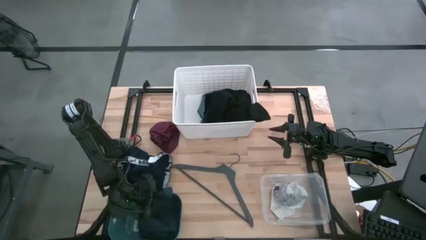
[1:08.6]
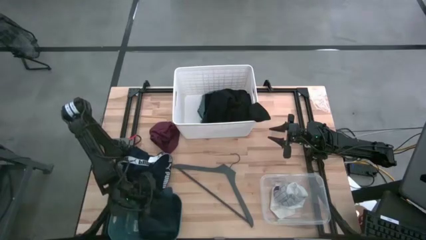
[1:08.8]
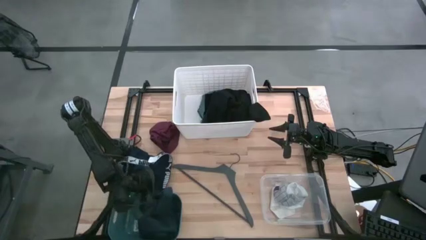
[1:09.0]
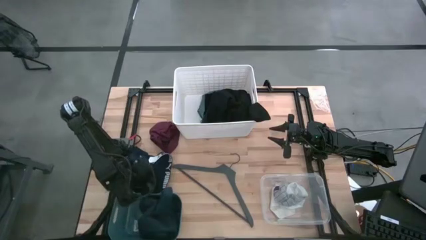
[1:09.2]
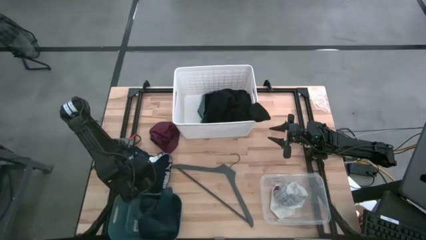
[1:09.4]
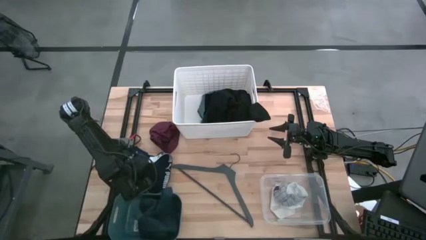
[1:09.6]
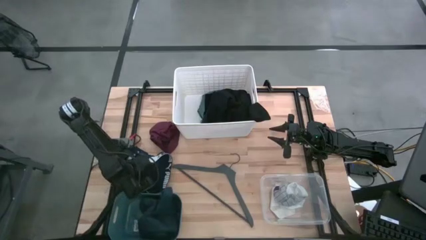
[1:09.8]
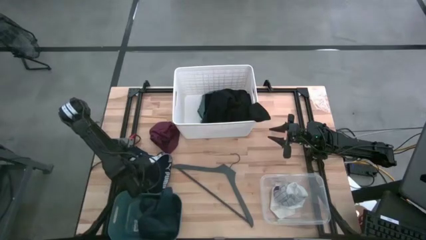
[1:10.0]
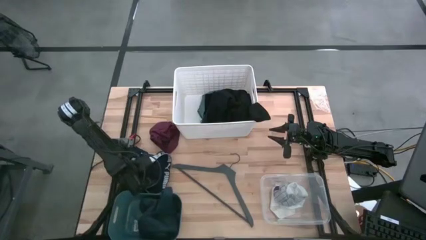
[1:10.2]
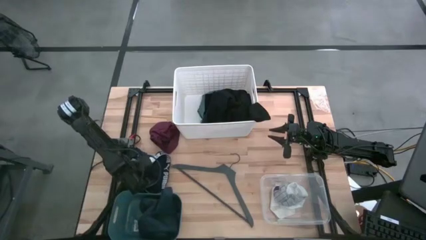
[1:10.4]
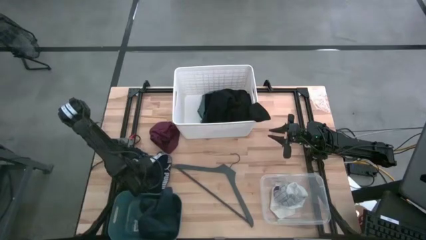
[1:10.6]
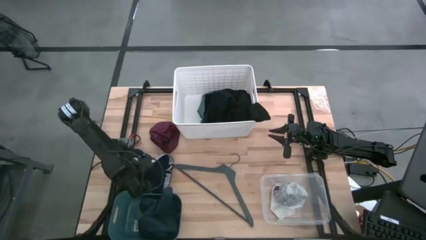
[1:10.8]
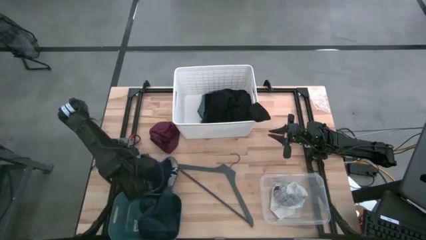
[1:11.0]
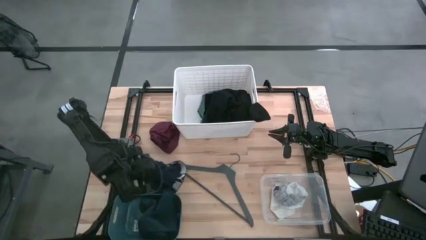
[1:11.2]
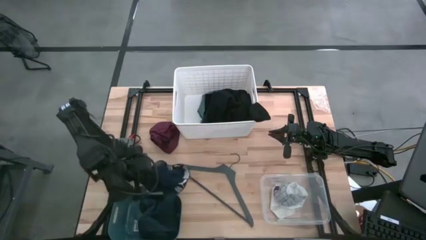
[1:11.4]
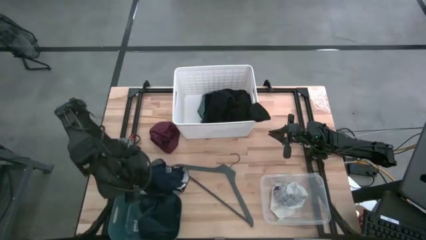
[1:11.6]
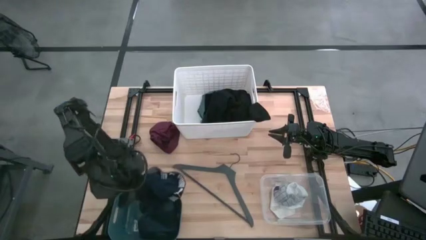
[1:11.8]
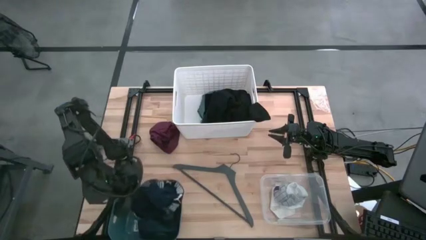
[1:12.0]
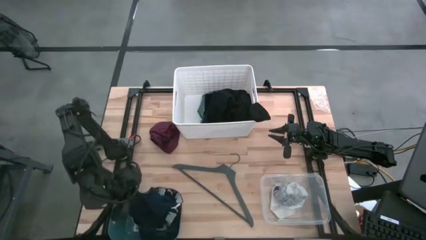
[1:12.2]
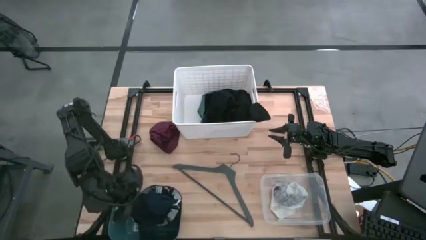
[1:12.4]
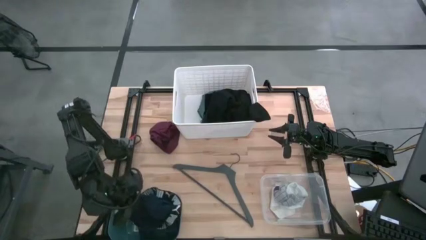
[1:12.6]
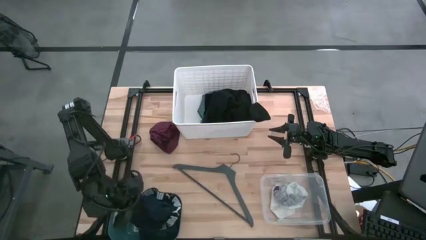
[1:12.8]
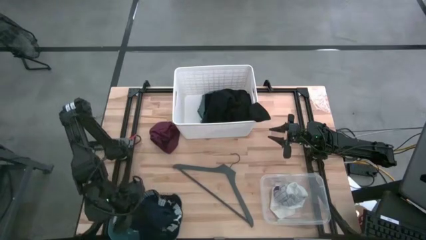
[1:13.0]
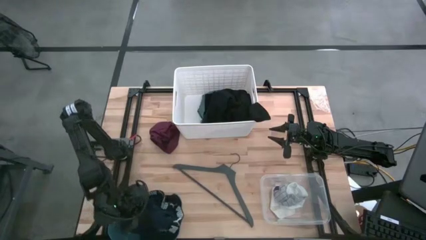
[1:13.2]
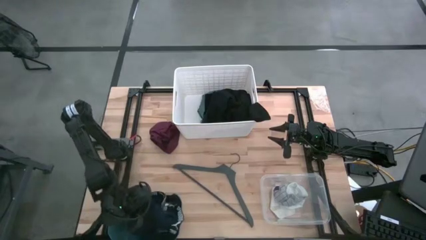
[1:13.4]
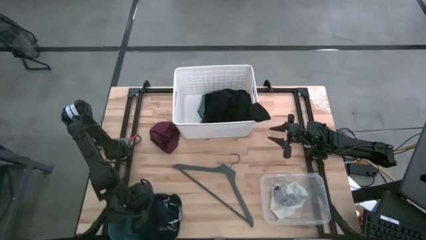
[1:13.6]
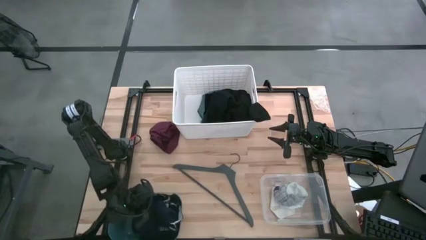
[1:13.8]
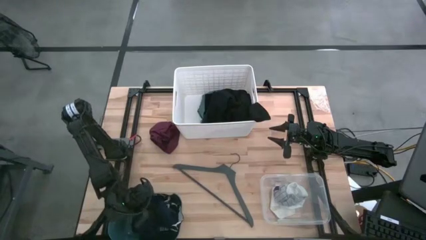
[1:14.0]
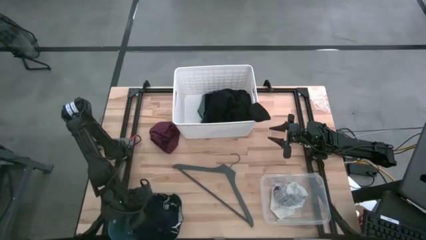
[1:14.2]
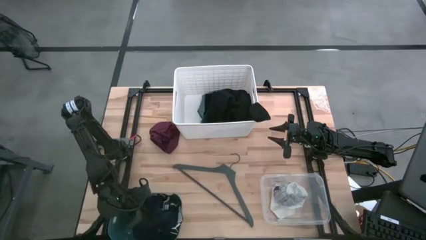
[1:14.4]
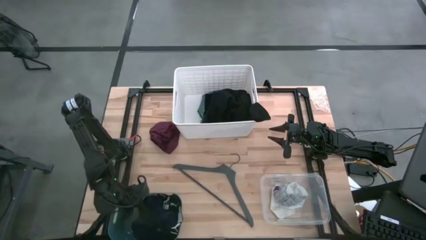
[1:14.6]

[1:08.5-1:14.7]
Task: Pick & Place Cloths
Put the dark blue boxer into the dark green bin

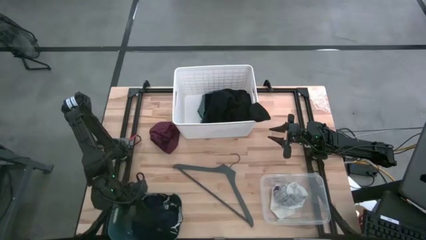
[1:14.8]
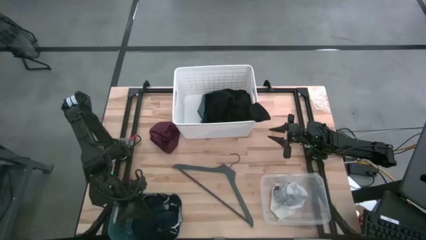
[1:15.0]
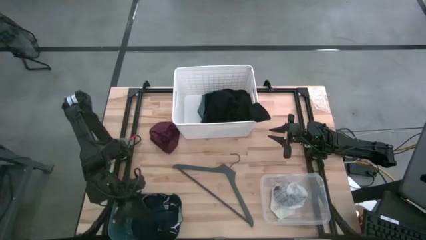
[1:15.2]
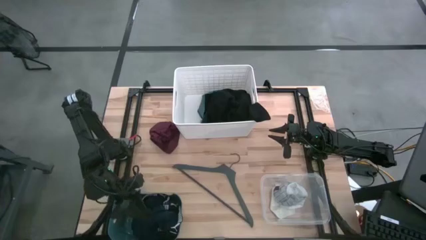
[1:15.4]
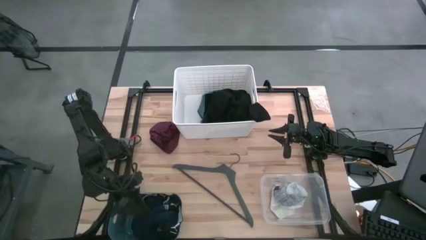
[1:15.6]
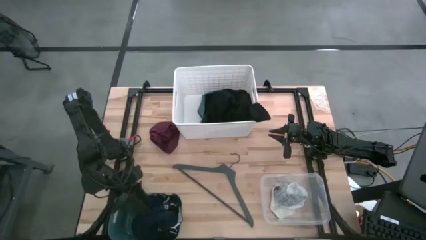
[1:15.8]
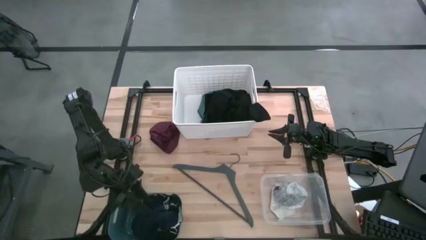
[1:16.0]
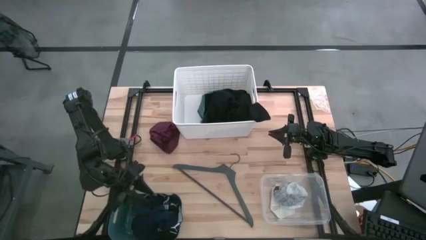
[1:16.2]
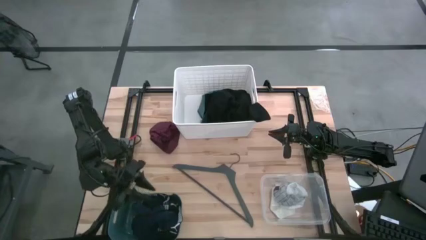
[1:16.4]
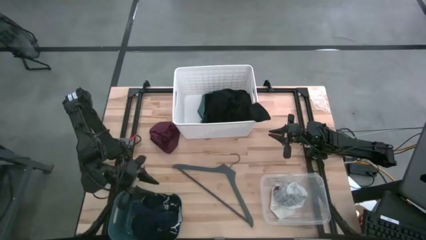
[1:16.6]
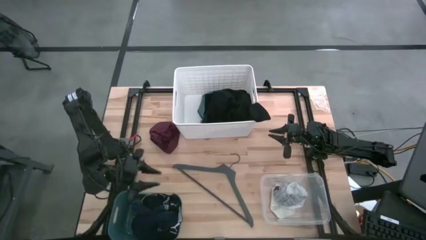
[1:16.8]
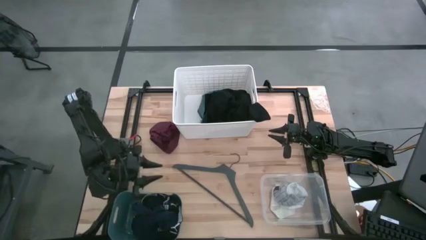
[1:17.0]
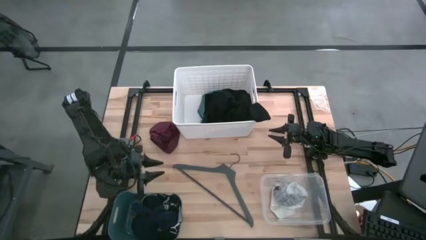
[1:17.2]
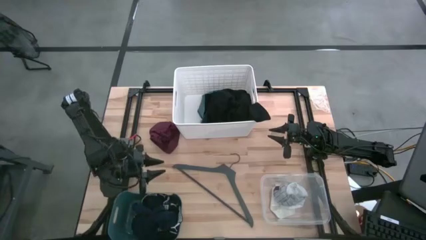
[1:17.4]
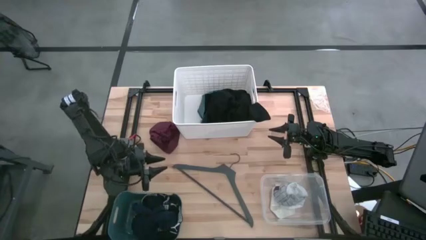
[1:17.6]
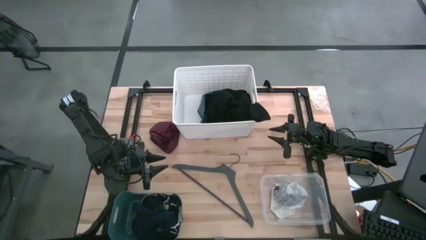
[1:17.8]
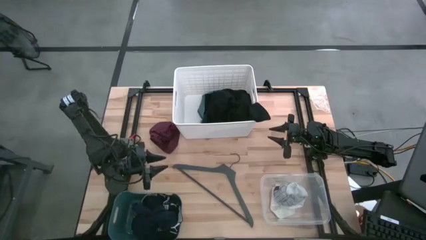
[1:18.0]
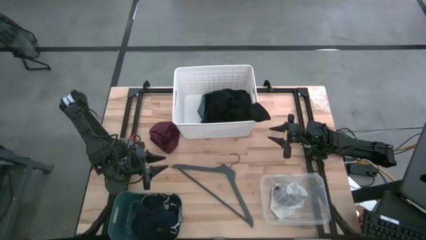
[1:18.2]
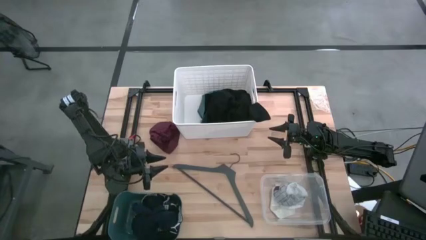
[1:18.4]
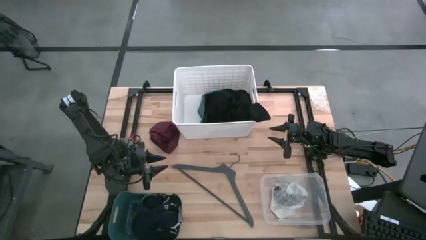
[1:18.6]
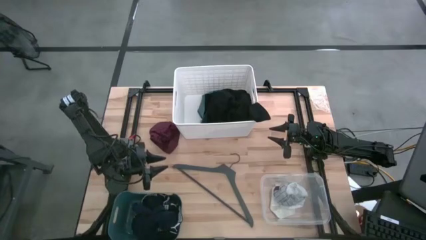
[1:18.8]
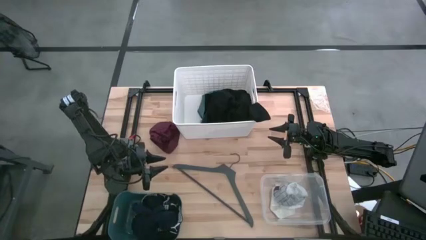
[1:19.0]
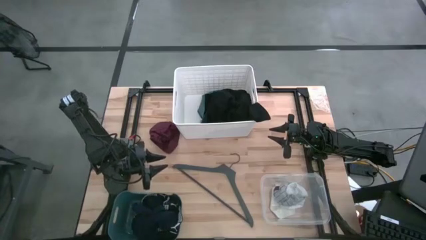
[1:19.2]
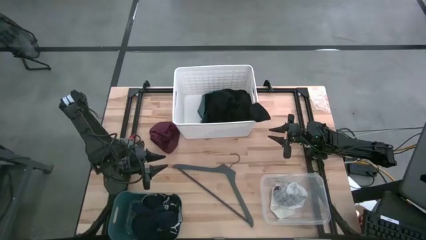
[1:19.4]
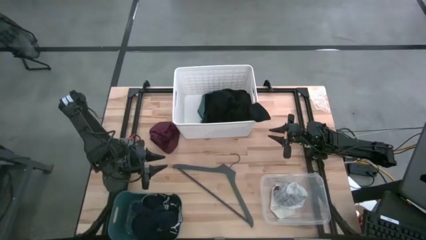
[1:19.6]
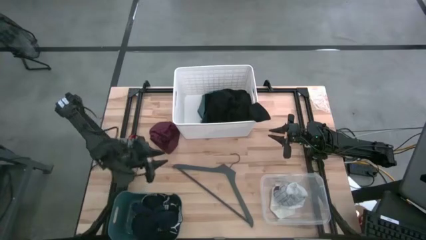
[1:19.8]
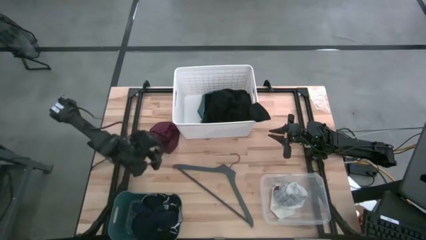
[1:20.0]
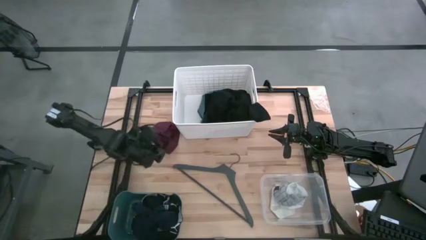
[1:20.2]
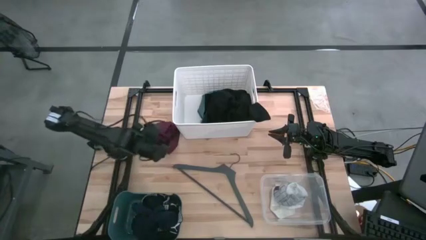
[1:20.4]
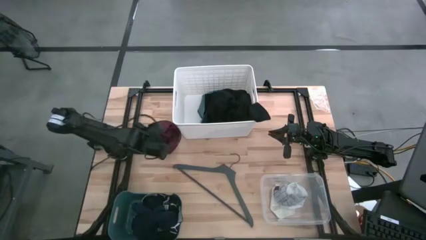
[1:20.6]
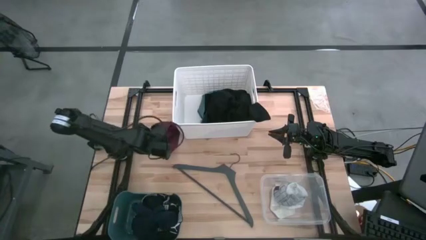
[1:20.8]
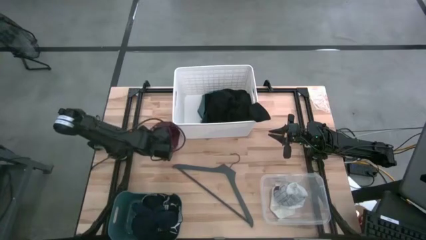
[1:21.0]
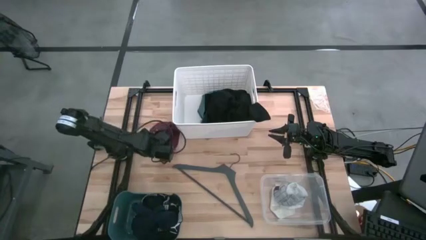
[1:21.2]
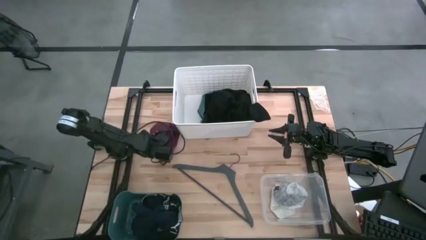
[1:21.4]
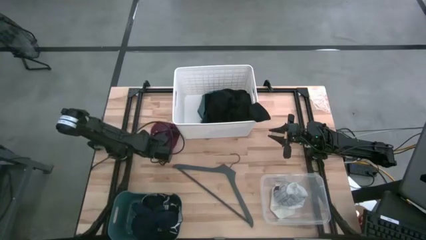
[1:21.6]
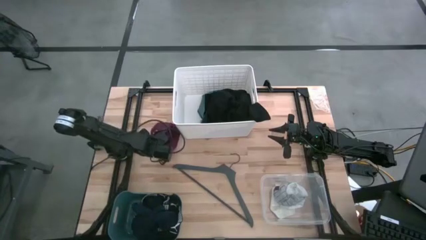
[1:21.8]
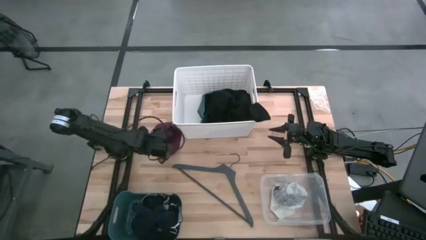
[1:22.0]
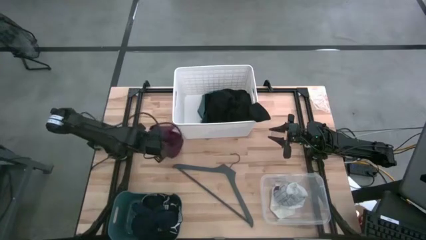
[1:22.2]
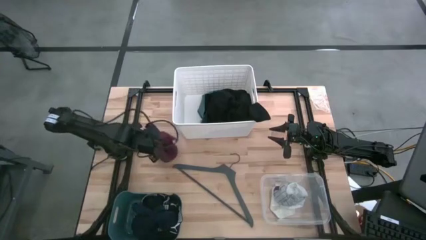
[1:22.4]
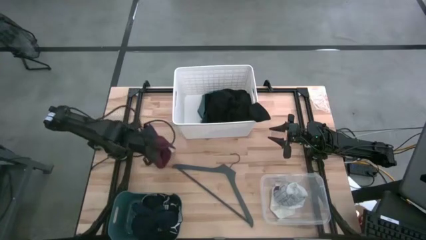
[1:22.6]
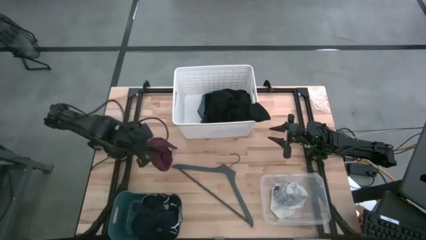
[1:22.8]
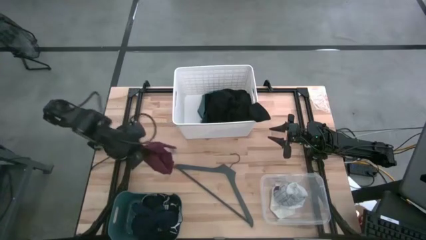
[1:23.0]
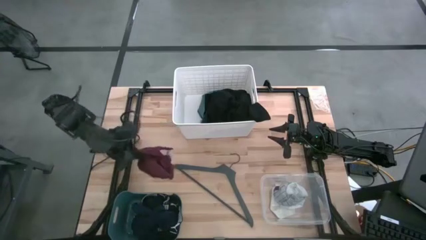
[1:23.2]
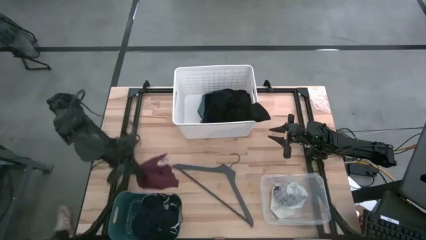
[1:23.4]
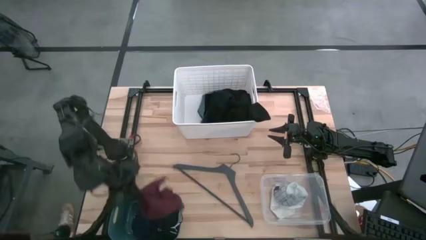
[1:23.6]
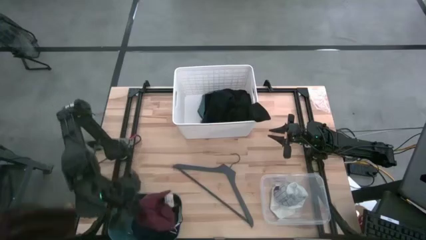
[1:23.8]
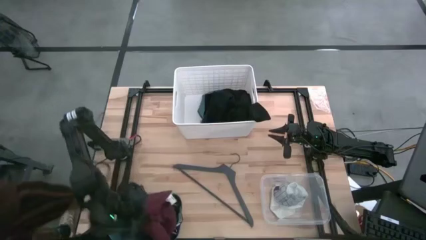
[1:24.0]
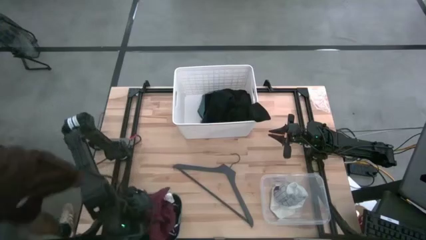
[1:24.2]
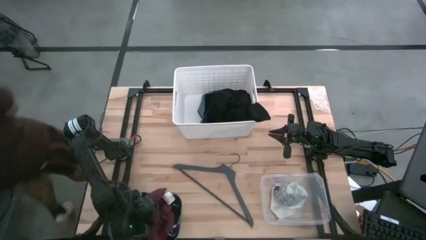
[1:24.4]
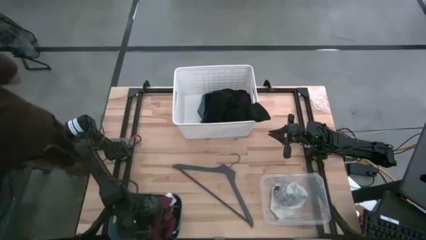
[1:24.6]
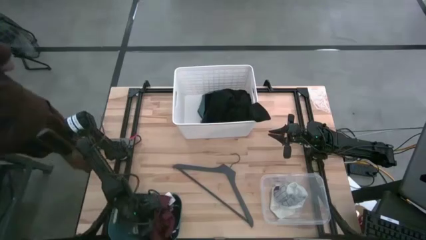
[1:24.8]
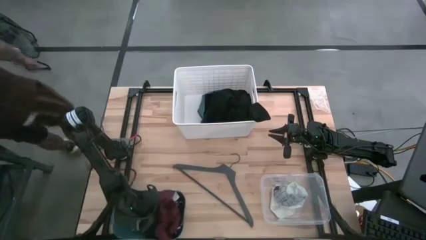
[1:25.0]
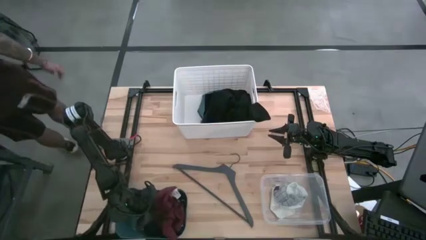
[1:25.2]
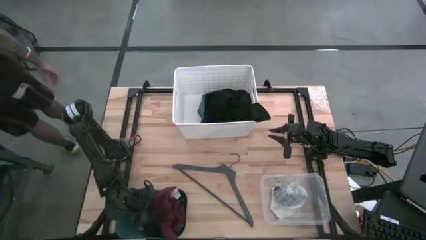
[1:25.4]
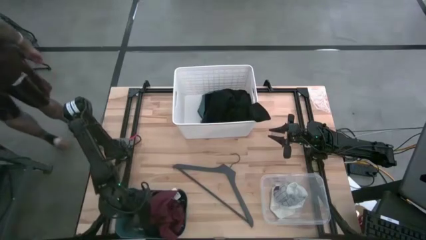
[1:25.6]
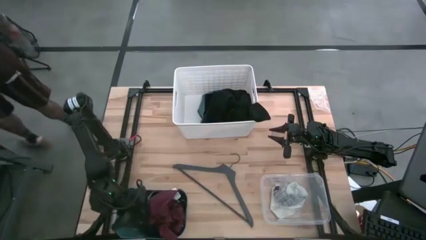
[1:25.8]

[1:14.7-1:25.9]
Put the dark red boxer into the dark green bin
